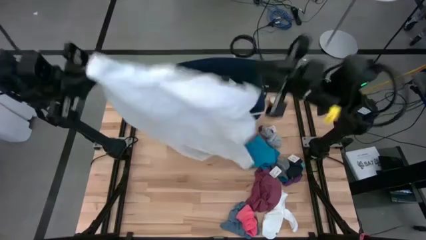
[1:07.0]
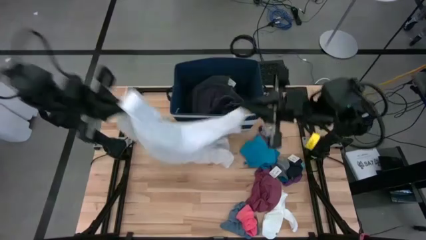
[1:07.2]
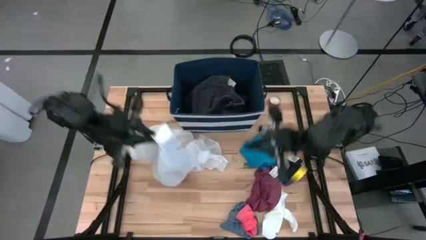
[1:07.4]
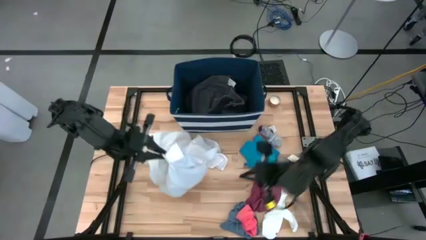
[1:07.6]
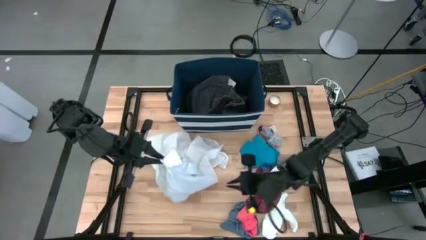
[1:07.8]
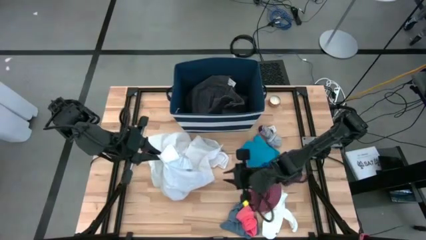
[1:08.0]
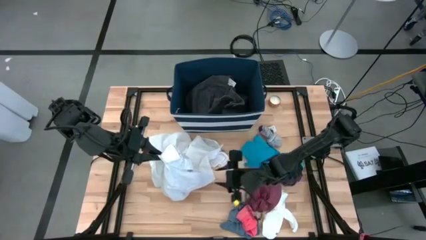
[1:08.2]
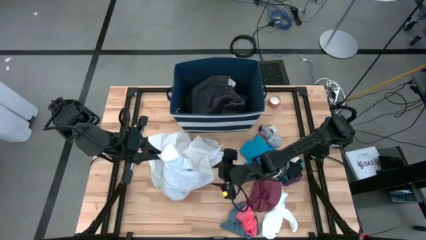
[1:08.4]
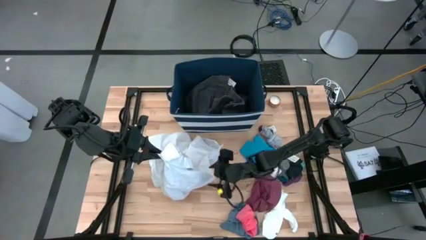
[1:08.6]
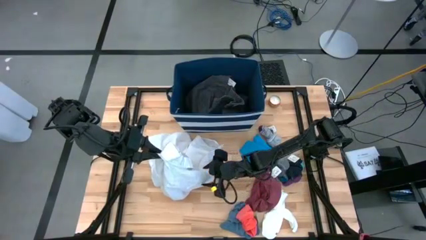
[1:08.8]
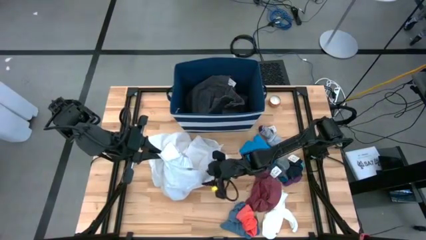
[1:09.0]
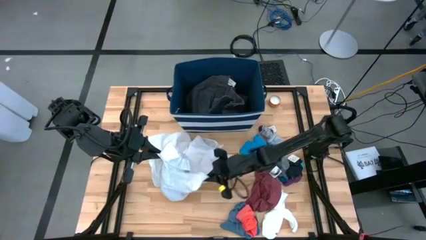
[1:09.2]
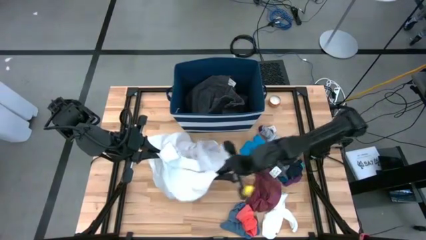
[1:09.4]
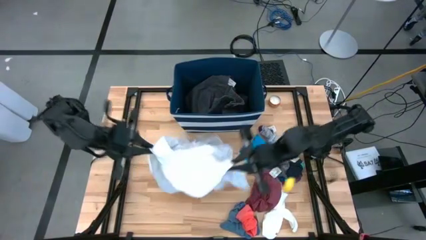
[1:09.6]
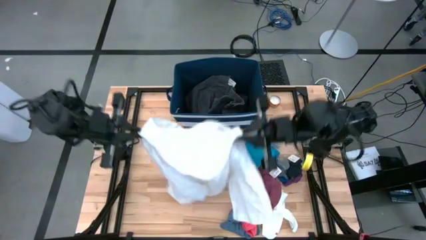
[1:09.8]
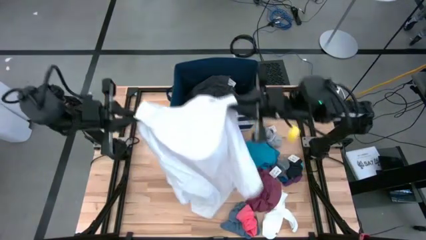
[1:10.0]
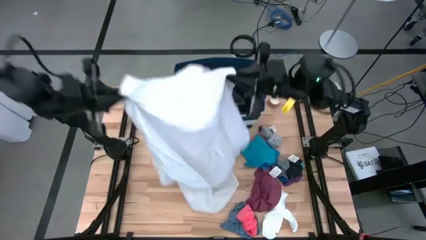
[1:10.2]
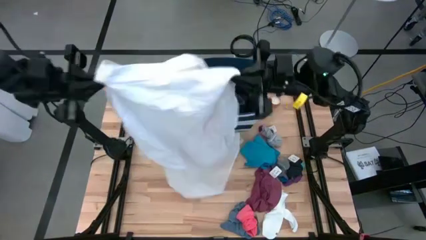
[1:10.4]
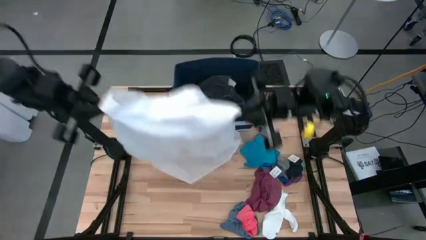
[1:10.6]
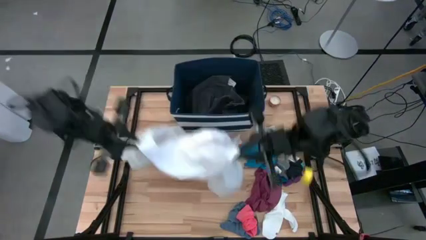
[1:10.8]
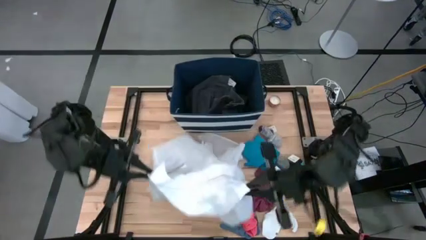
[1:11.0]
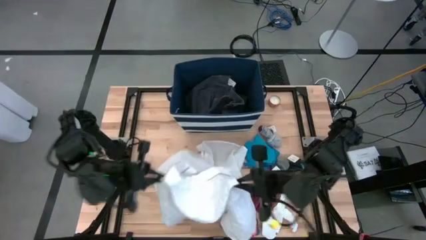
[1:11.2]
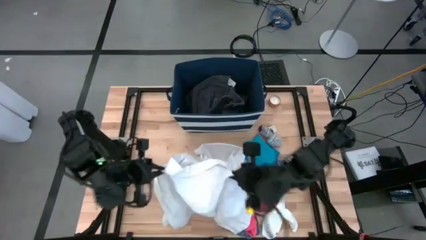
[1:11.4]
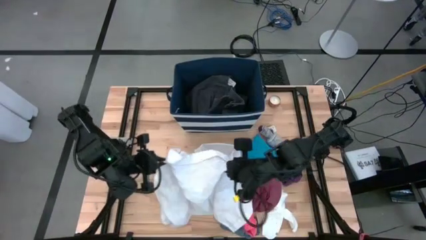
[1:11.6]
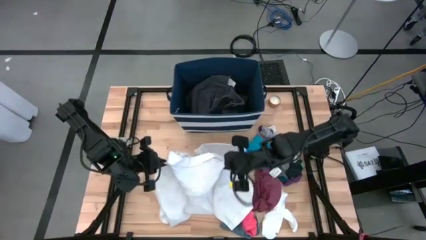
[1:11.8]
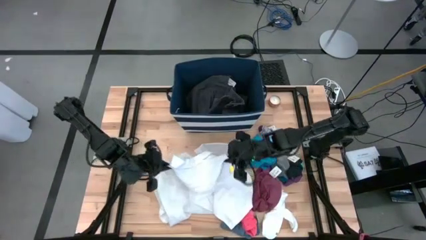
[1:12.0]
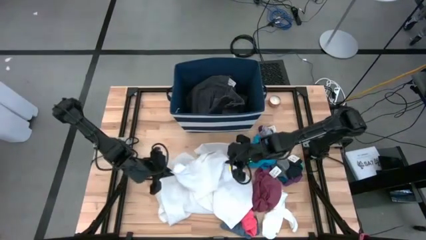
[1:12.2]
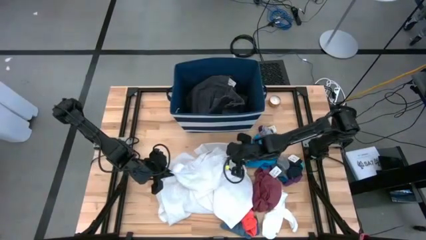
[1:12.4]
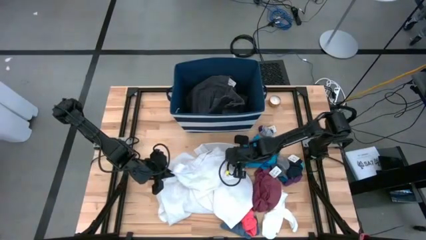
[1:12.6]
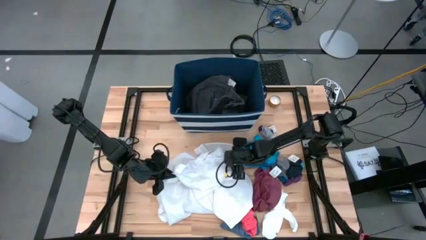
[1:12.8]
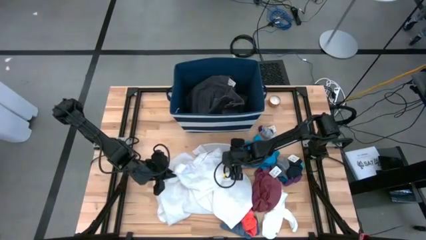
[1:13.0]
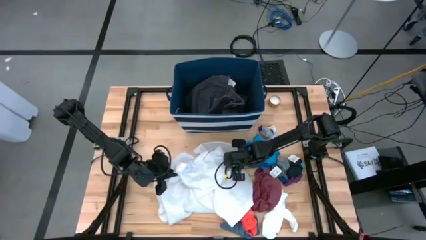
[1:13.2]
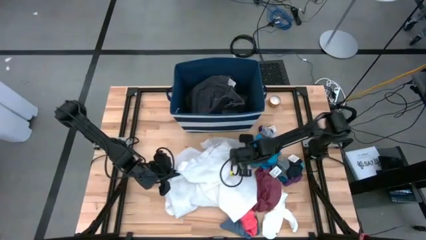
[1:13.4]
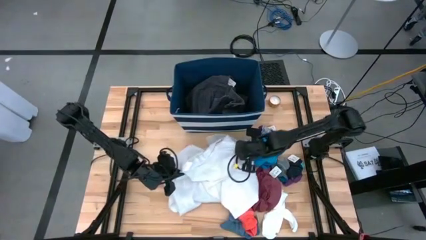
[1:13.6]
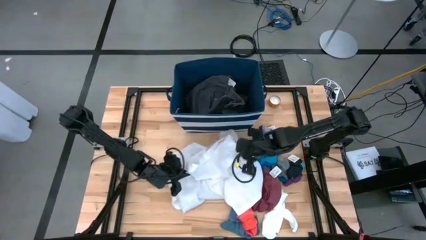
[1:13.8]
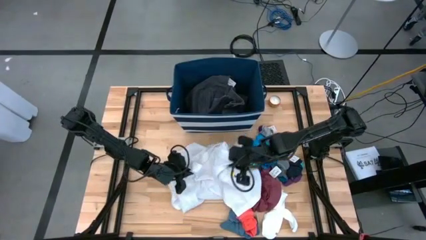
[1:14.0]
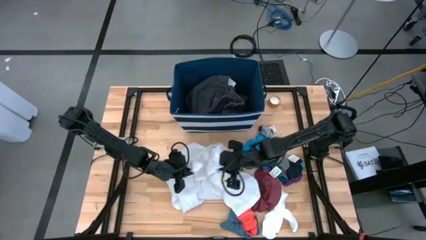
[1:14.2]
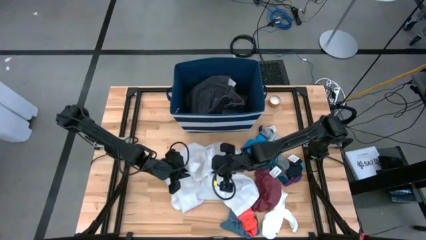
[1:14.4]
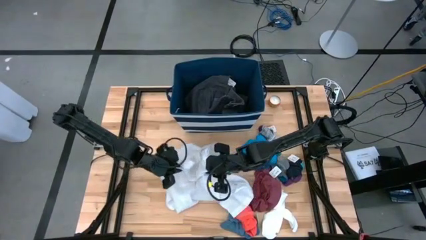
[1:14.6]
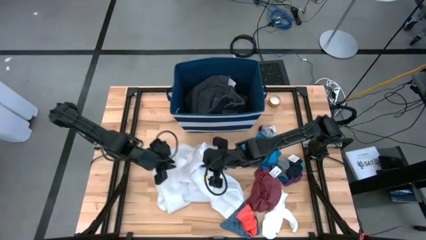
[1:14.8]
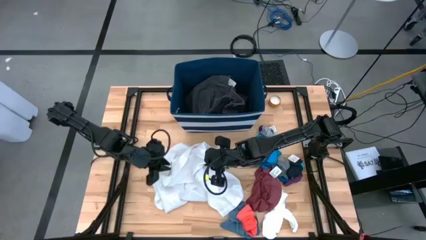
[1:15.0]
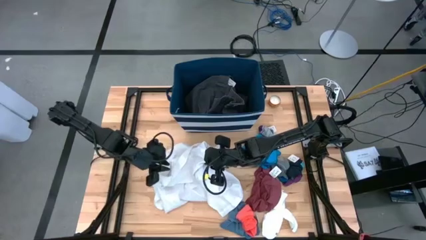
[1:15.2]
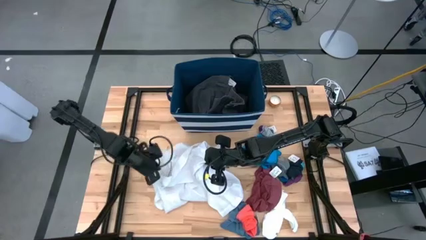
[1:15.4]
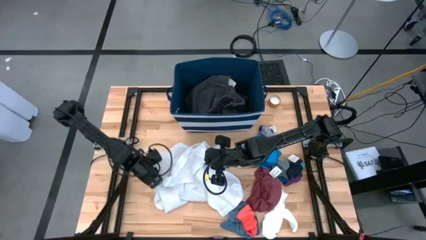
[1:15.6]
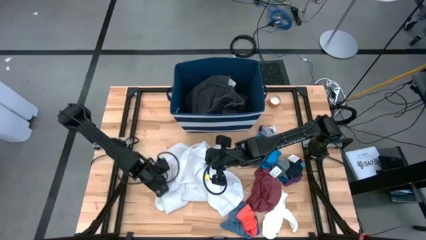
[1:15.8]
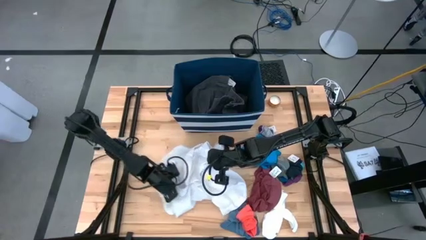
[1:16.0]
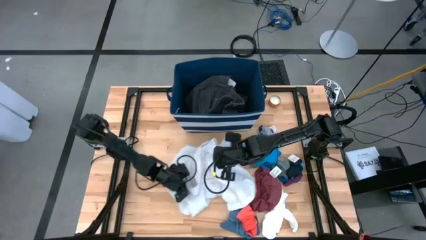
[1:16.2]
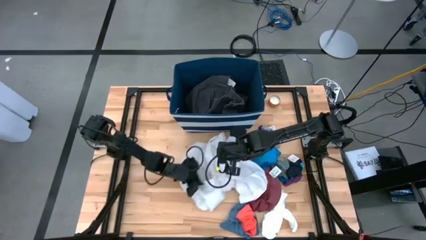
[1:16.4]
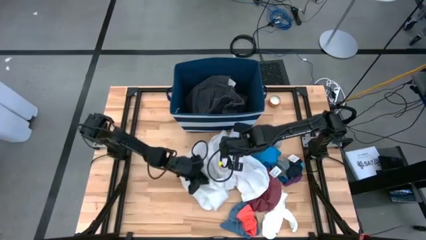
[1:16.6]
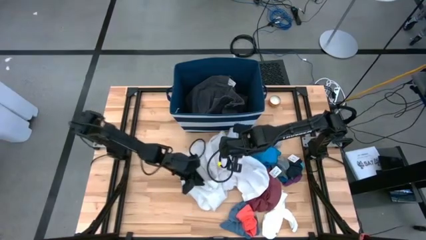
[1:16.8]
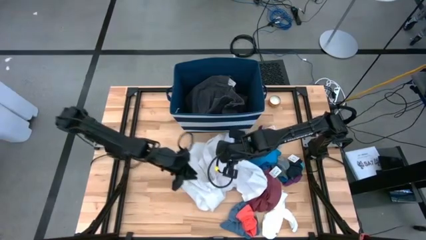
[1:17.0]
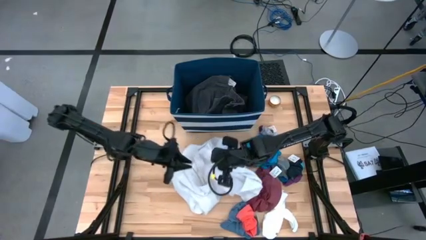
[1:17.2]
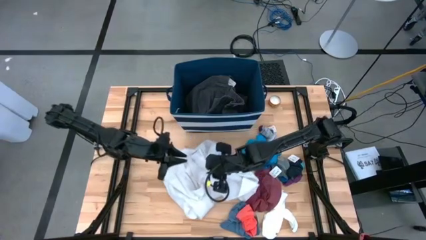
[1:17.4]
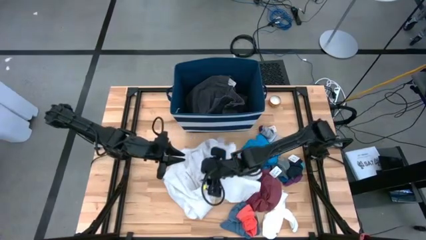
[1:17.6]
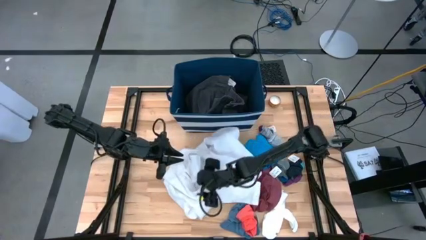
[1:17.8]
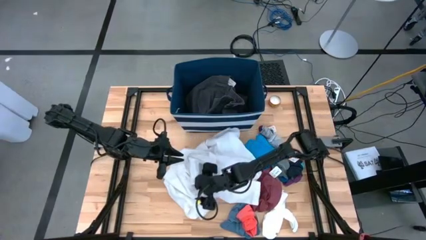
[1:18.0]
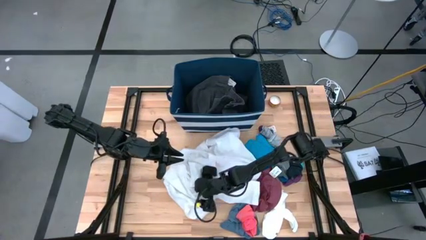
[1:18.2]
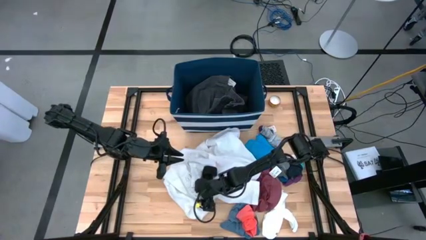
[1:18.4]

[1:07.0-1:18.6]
Task: Sort clothes
Put the white polo shirt into the blue laundry organizer
